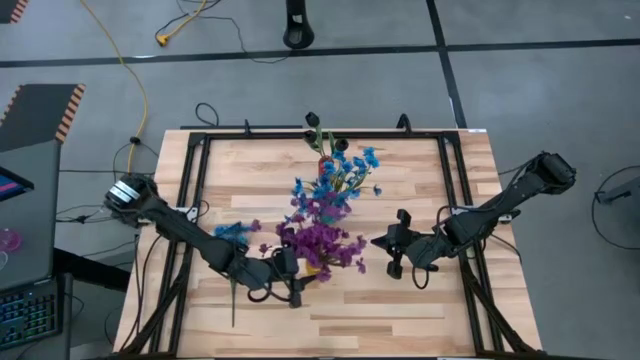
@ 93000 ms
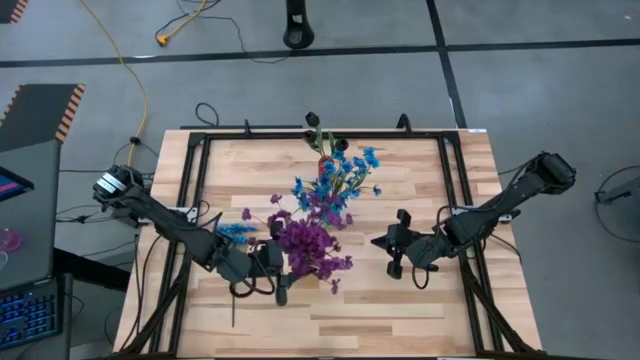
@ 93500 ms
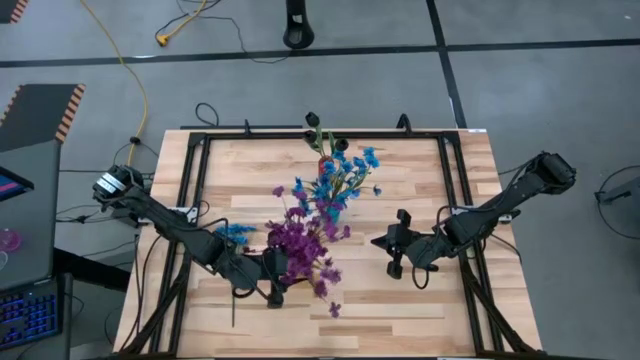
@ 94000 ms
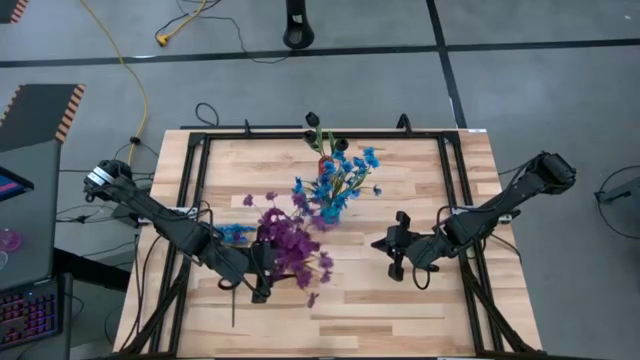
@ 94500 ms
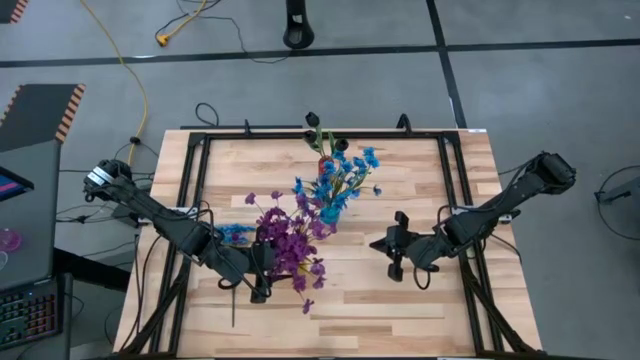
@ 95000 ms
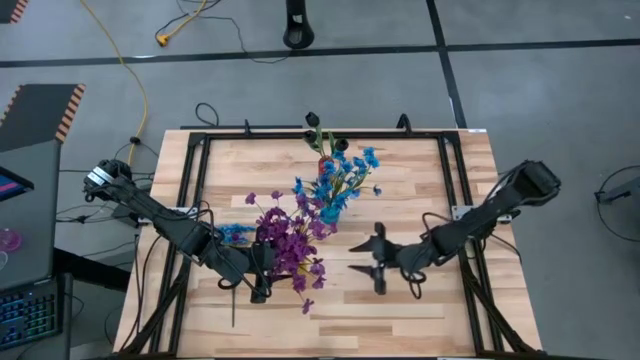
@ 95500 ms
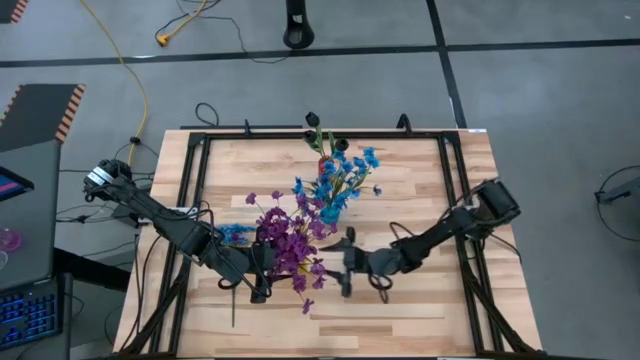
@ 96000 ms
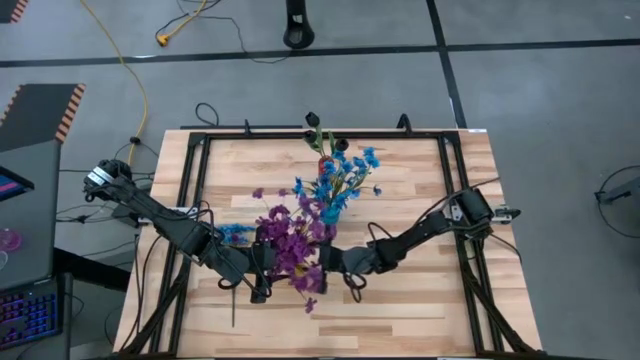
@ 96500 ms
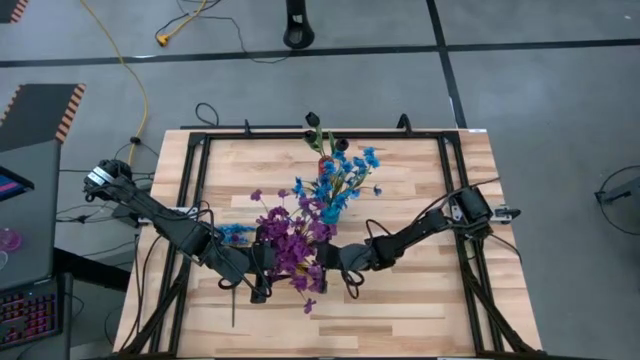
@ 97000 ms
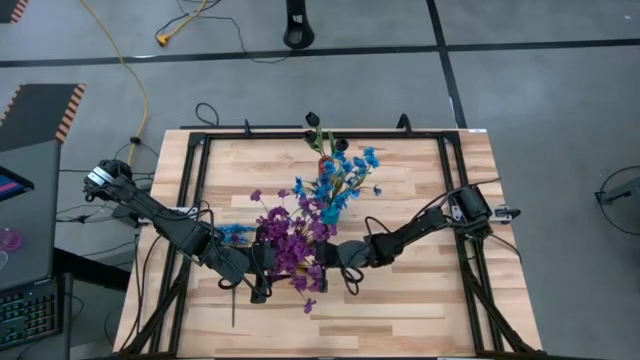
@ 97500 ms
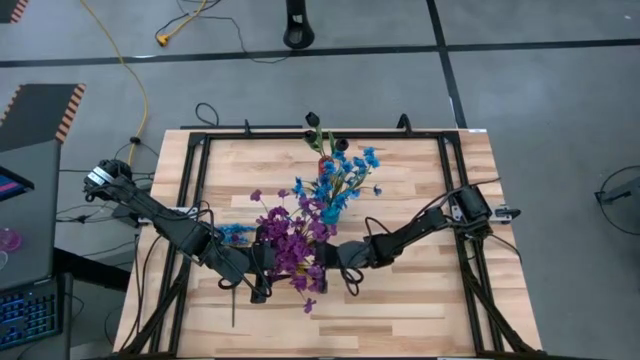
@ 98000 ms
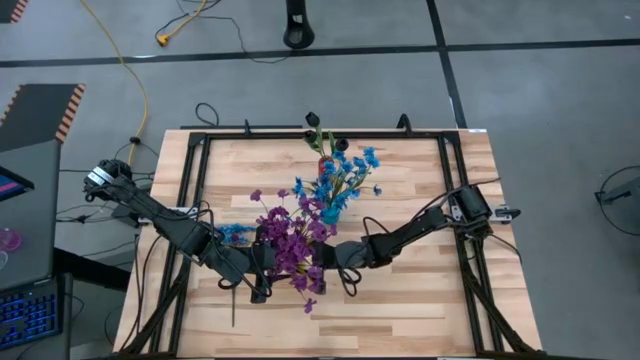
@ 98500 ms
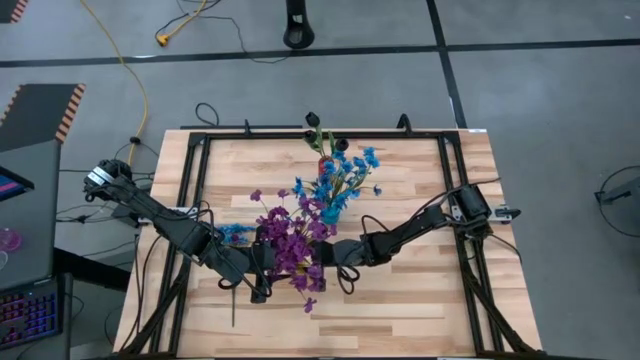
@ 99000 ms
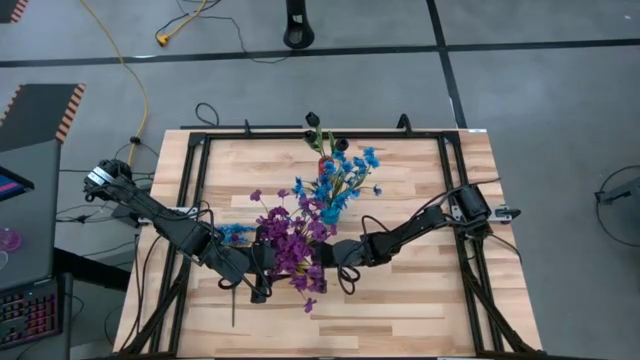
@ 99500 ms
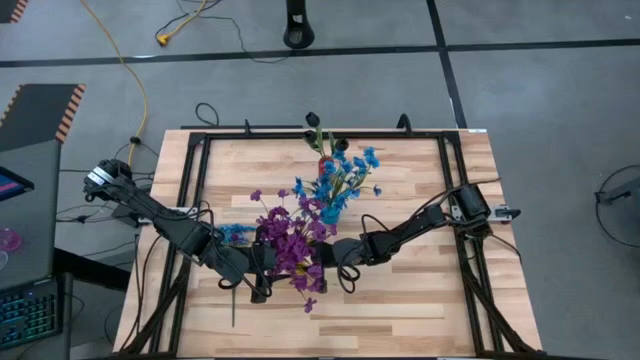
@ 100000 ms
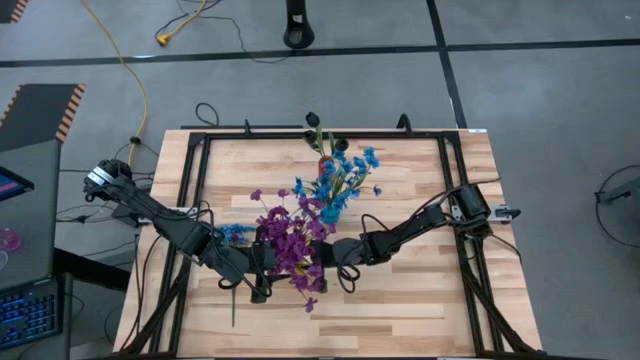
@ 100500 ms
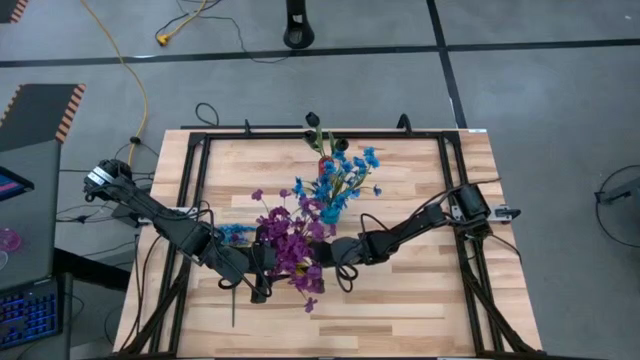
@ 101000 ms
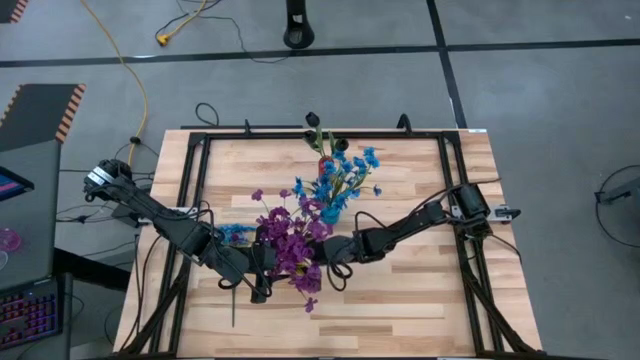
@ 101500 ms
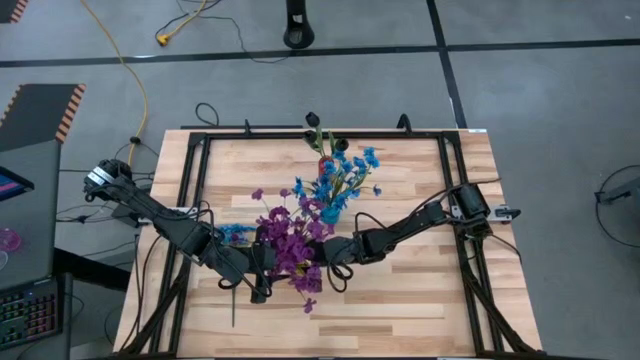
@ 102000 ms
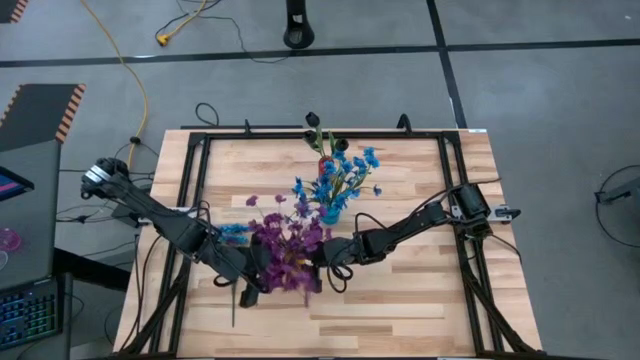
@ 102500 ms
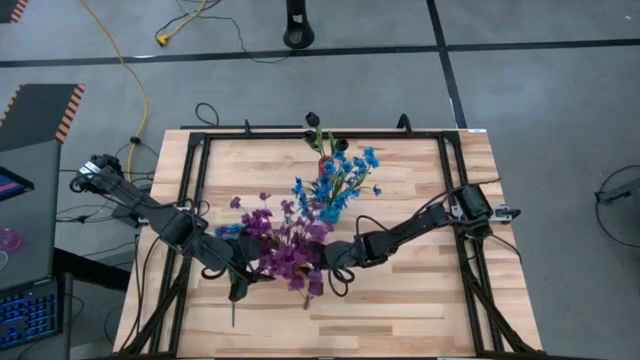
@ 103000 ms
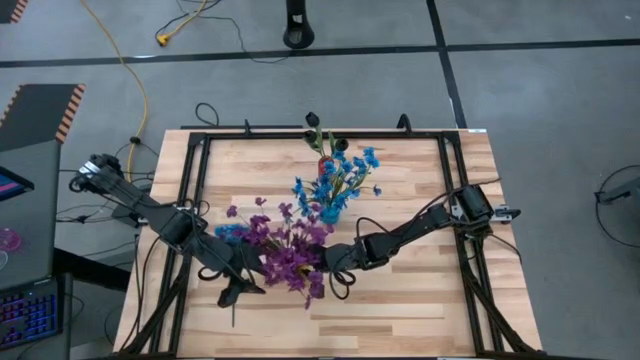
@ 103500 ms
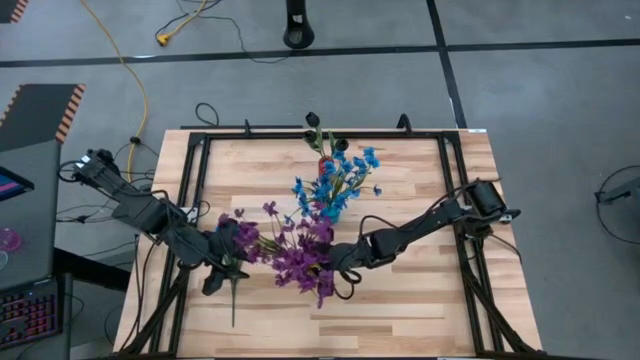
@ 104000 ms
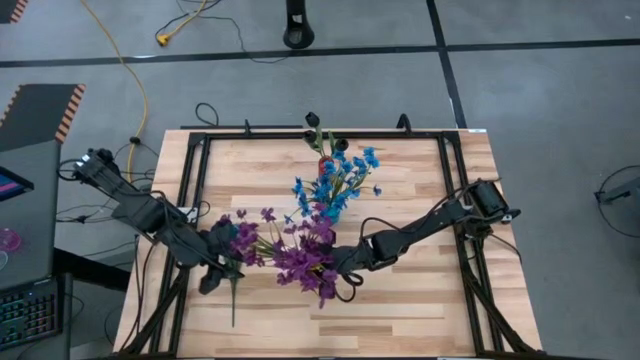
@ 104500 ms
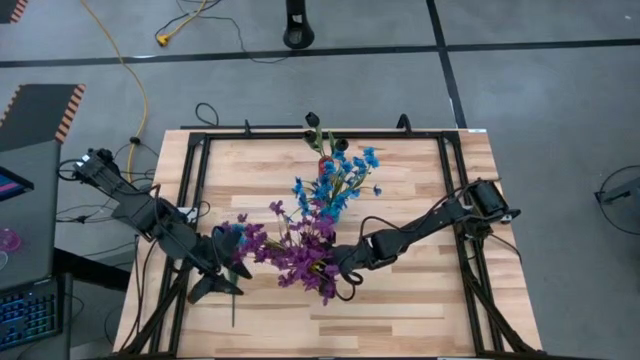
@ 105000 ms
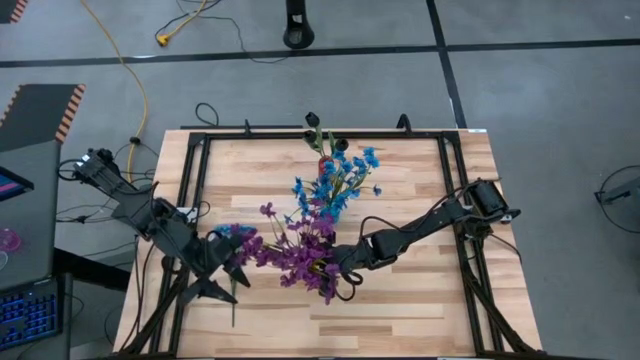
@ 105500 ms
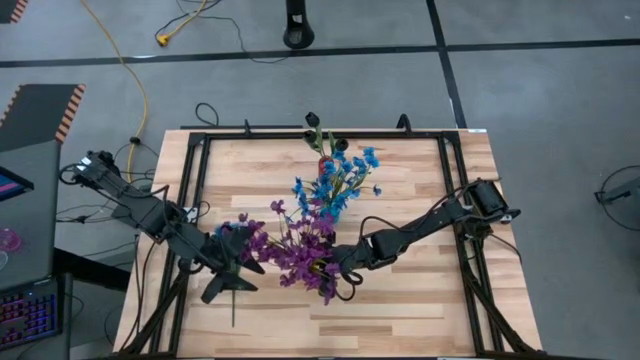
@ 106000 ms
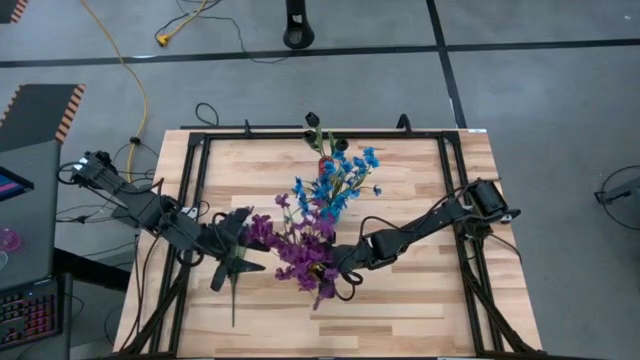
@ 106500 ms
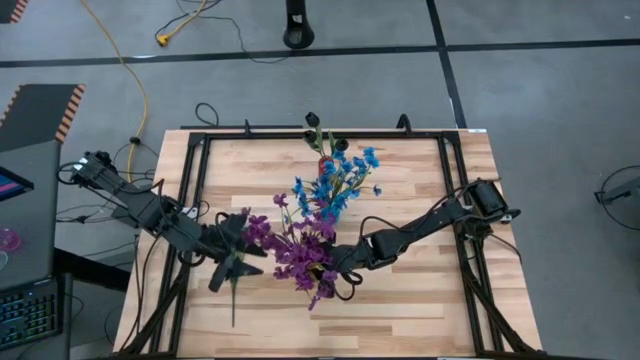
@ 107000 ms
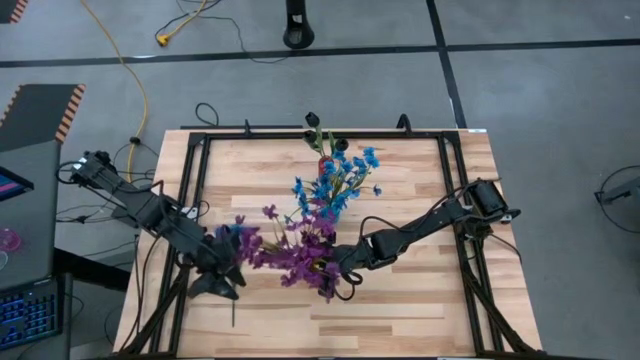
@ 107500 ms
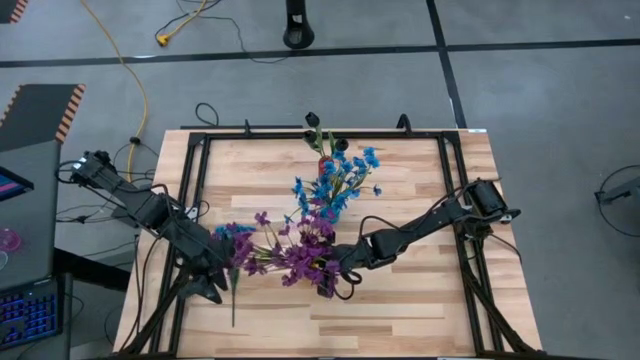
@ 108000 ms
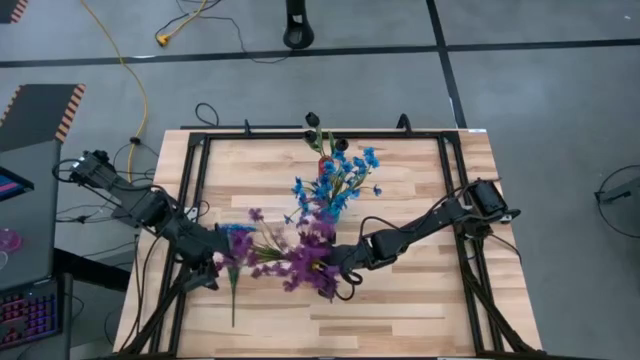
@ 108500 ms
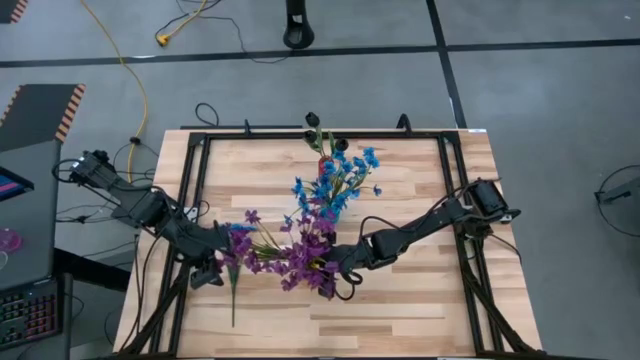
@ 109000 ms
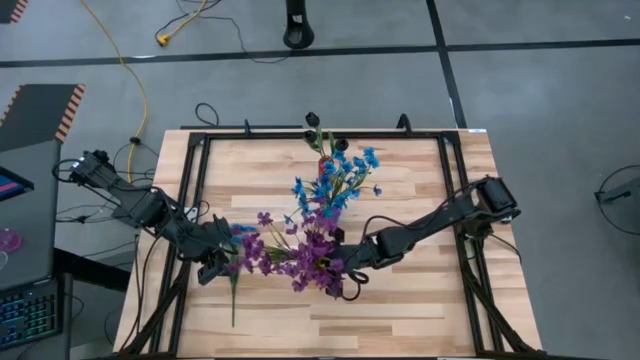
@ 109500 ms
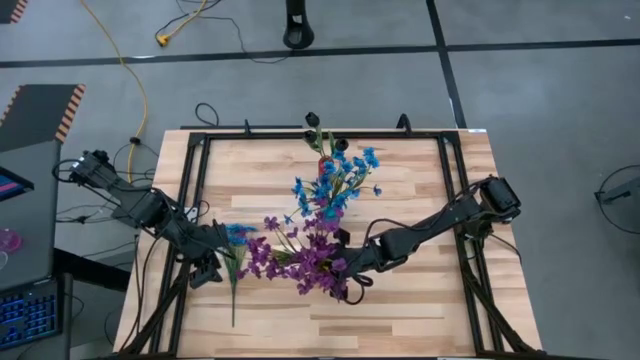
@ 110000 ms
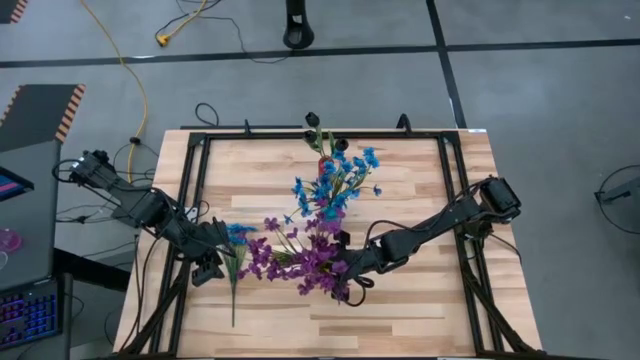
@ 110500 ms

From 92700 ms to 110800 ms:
Task: Sort flowers into vase by color
Put the violet flower into the yellow crystal vase

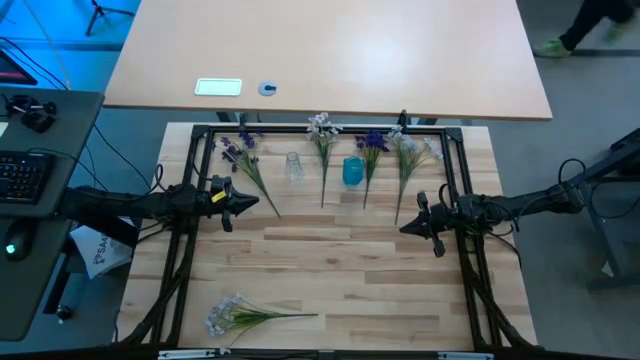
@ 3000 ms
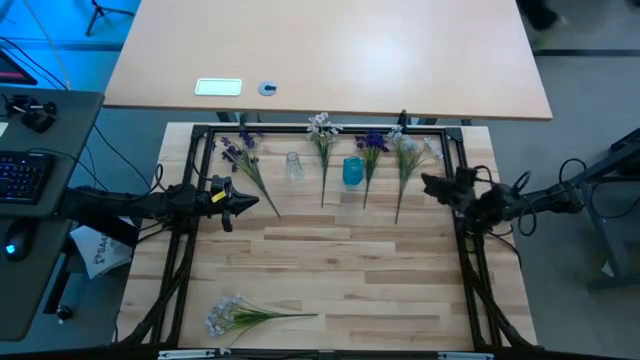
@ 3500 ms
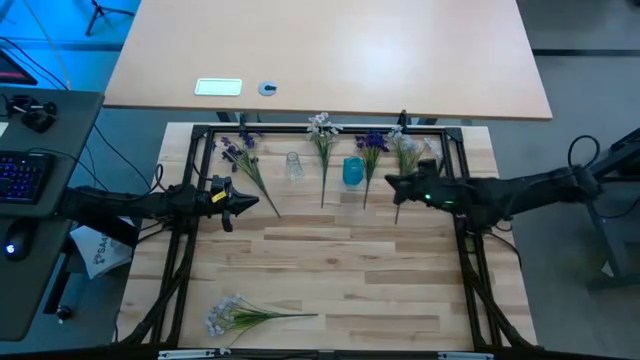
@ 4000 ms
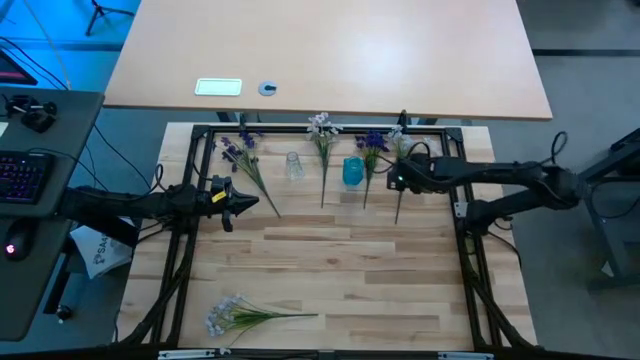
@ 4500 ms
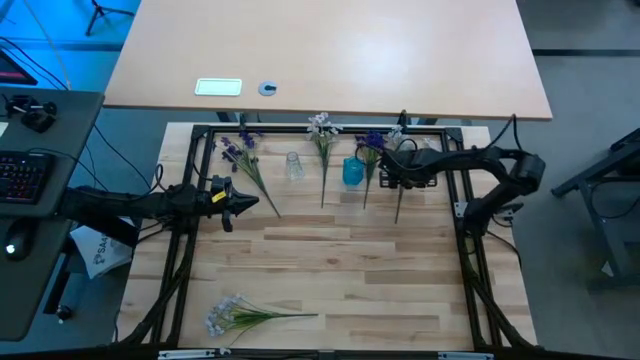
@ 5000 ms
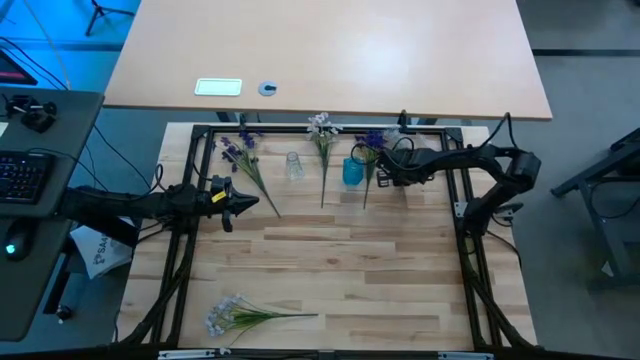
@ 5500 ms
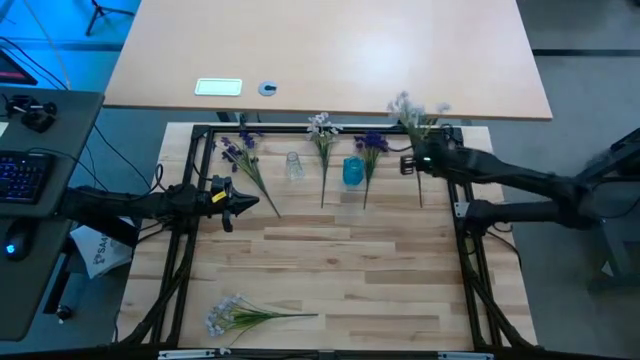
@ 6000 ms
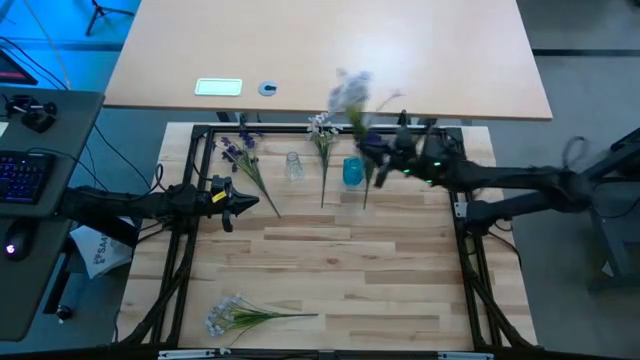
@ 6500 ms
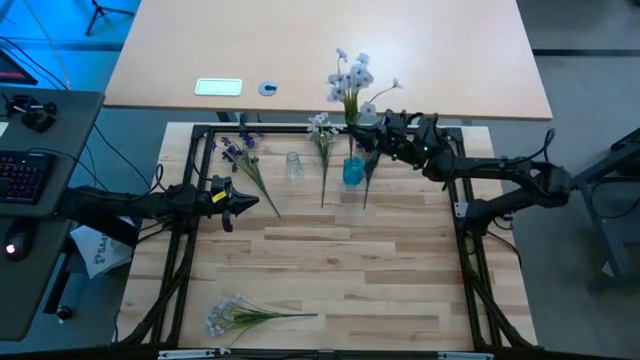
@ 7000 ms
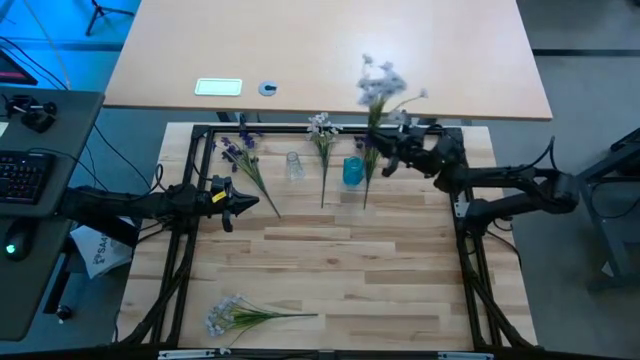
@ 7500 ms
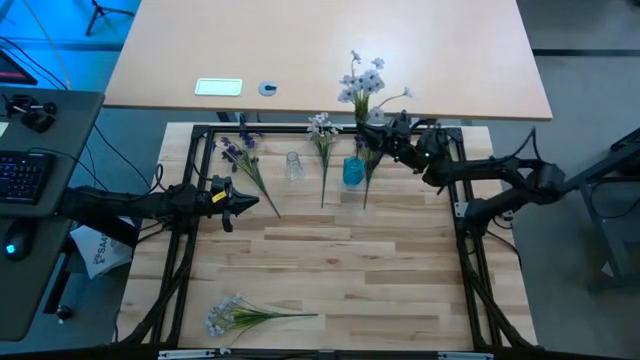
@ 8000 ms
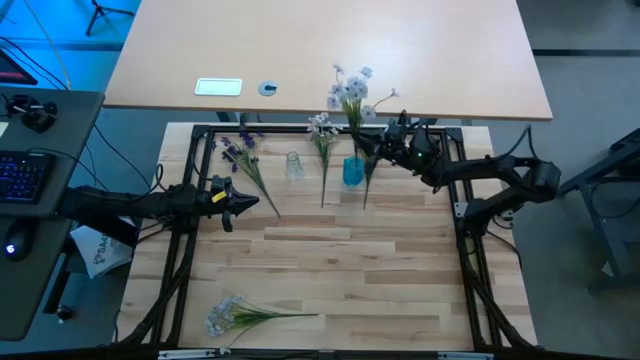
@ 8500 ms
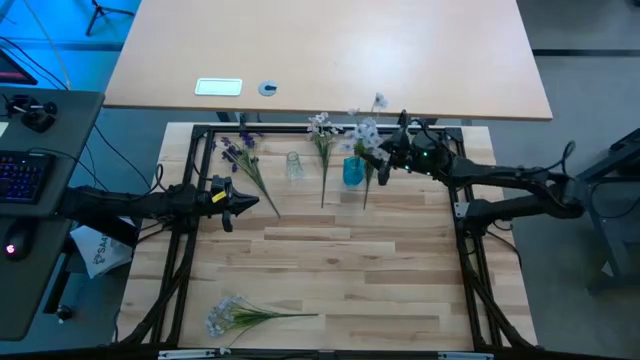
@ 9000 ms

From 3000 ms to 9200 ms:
Task: Sort flowers into vase by color
Put the right white flowers into the blue vase
